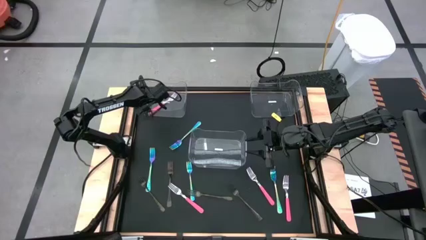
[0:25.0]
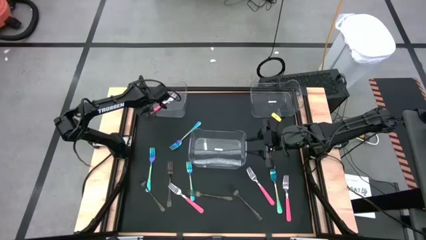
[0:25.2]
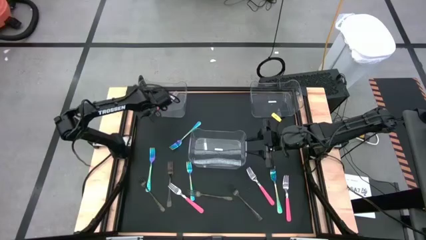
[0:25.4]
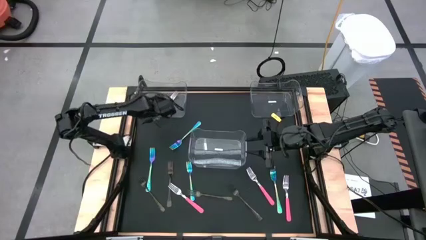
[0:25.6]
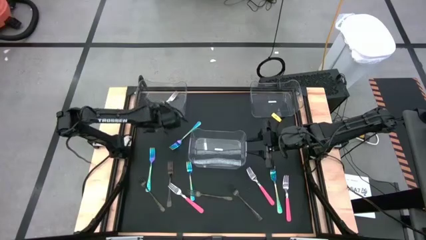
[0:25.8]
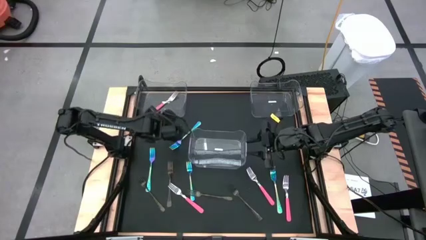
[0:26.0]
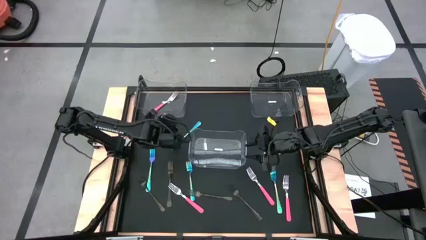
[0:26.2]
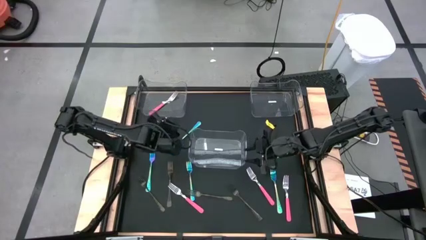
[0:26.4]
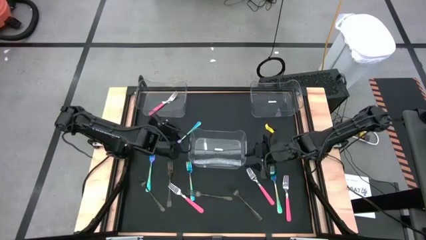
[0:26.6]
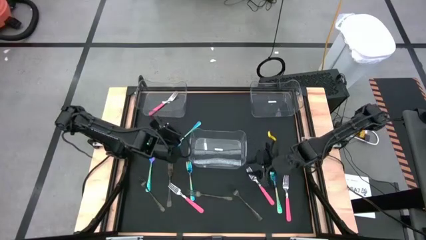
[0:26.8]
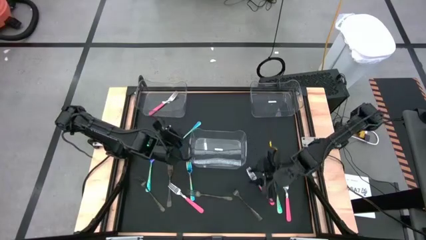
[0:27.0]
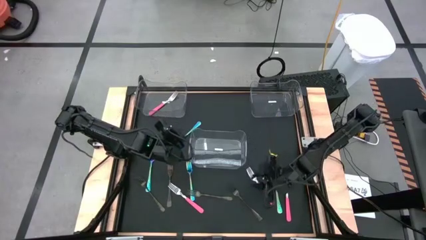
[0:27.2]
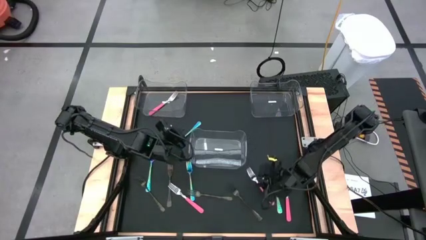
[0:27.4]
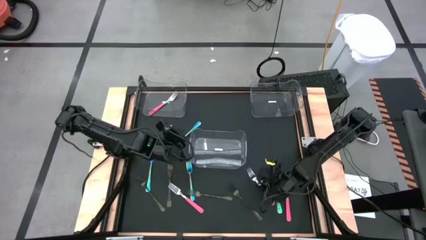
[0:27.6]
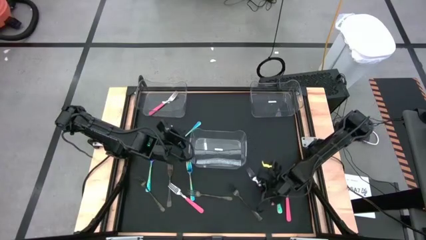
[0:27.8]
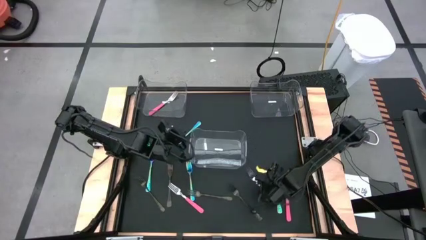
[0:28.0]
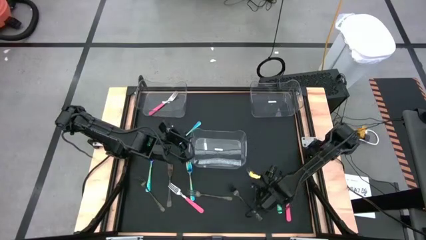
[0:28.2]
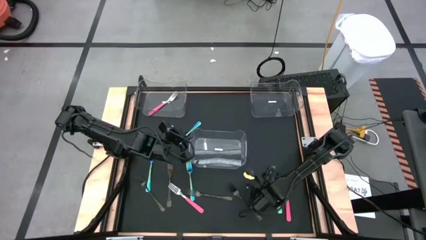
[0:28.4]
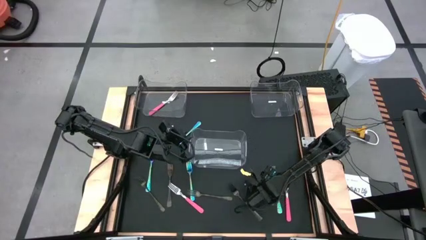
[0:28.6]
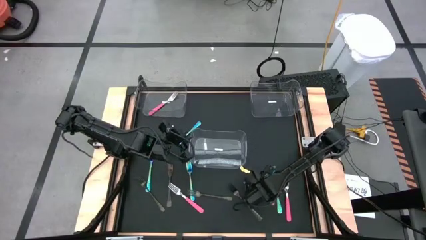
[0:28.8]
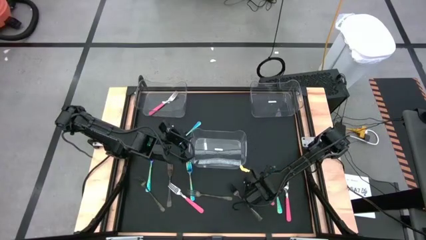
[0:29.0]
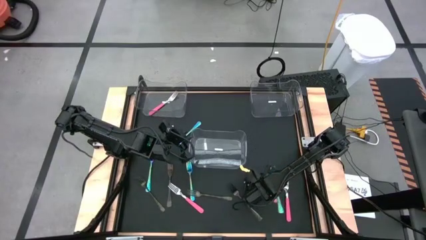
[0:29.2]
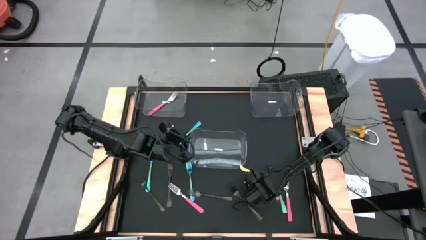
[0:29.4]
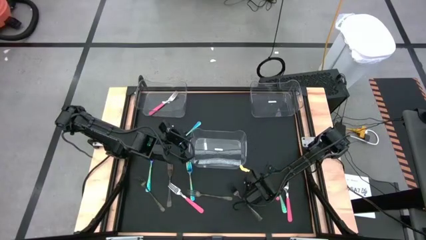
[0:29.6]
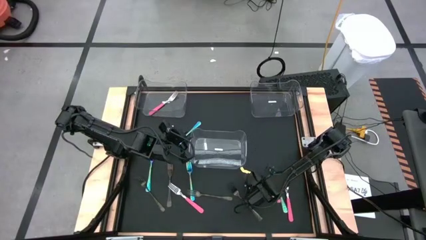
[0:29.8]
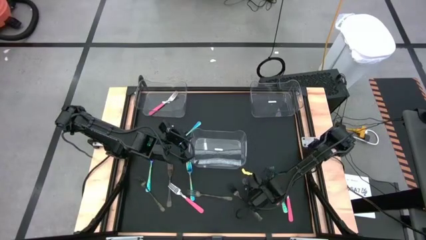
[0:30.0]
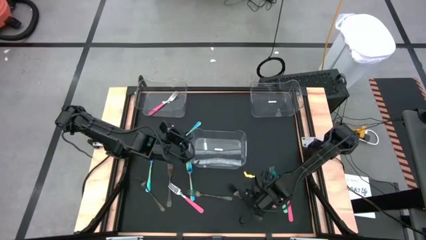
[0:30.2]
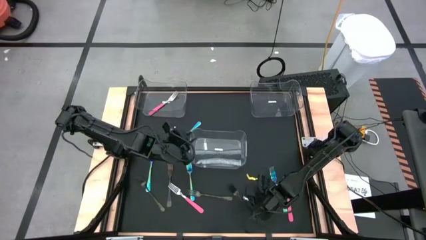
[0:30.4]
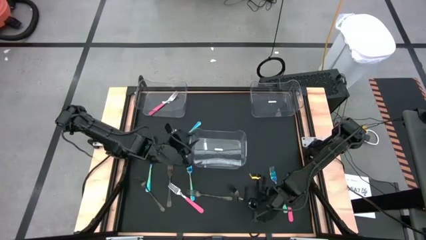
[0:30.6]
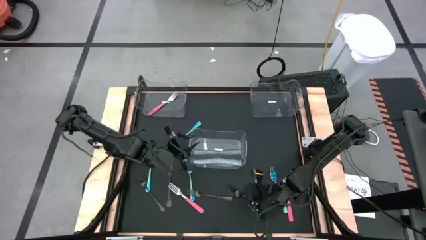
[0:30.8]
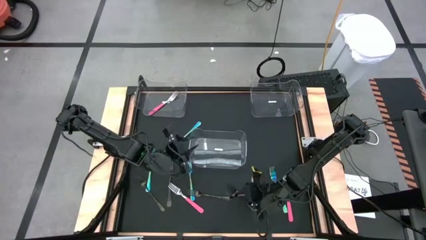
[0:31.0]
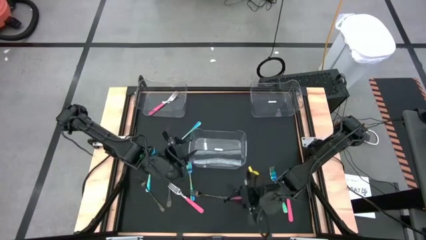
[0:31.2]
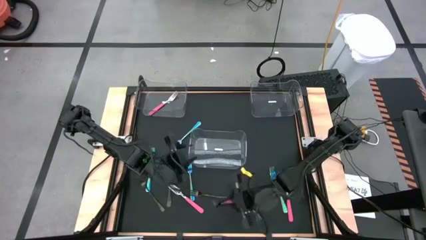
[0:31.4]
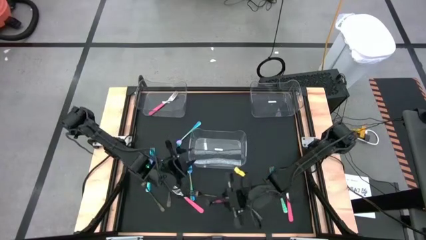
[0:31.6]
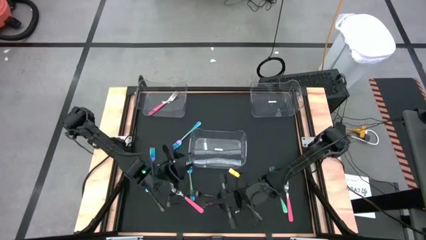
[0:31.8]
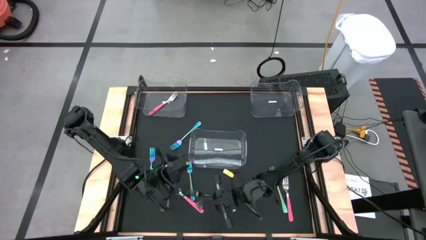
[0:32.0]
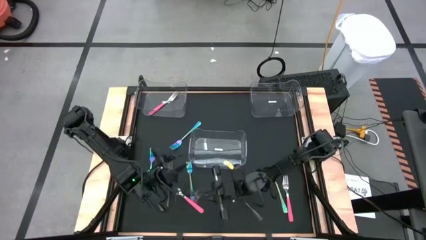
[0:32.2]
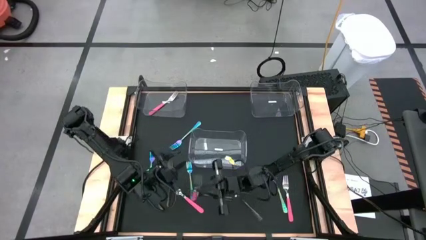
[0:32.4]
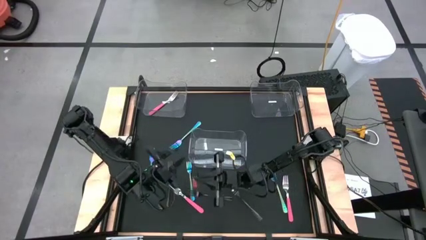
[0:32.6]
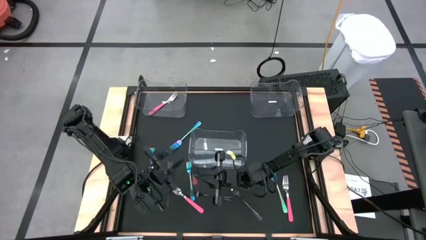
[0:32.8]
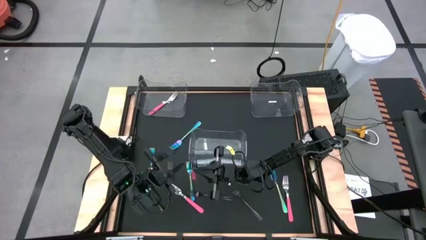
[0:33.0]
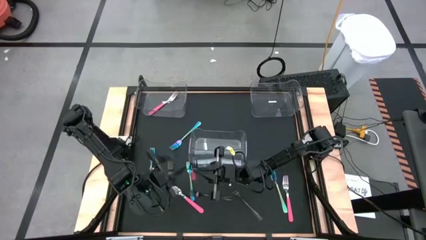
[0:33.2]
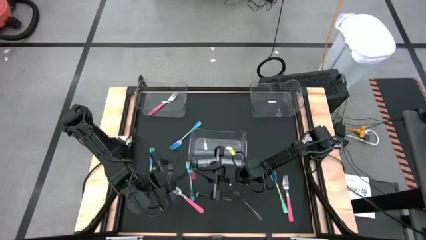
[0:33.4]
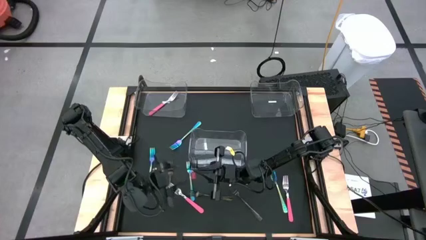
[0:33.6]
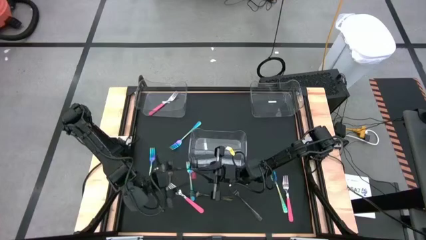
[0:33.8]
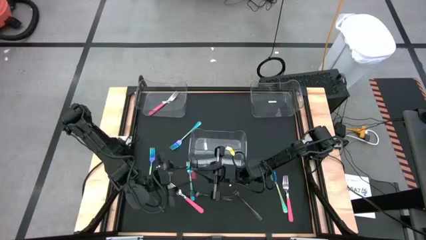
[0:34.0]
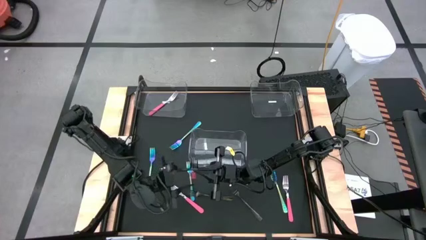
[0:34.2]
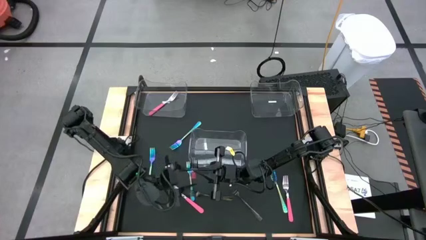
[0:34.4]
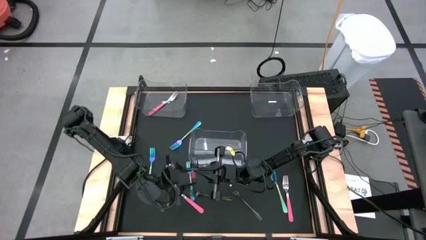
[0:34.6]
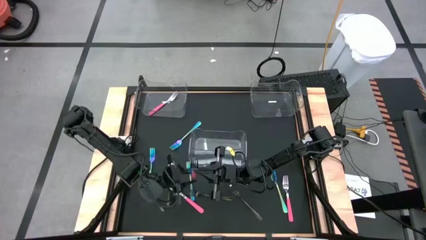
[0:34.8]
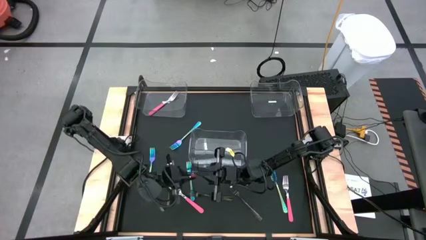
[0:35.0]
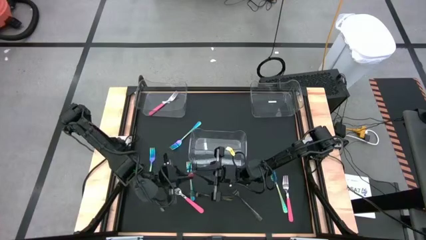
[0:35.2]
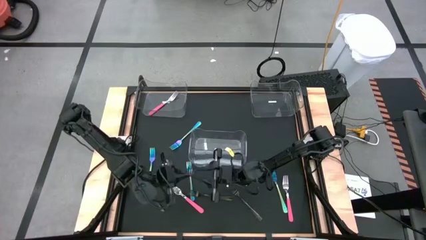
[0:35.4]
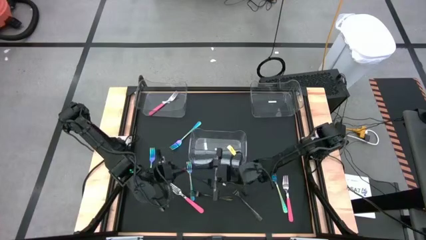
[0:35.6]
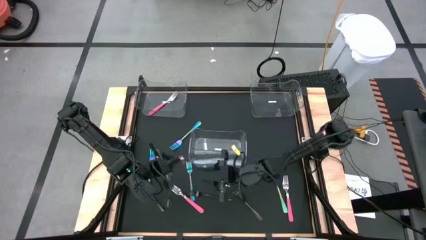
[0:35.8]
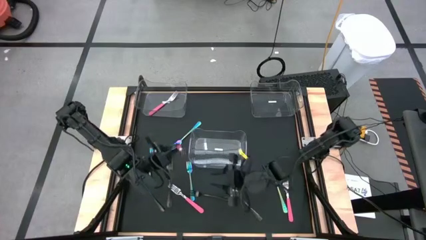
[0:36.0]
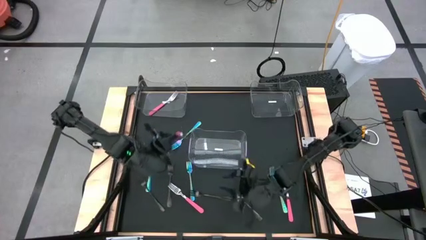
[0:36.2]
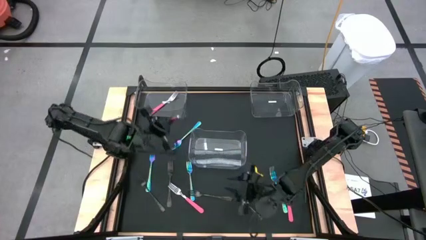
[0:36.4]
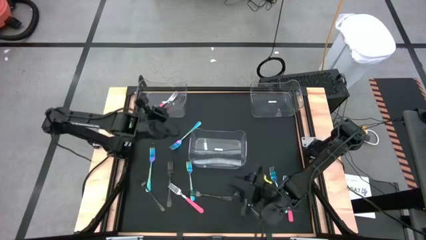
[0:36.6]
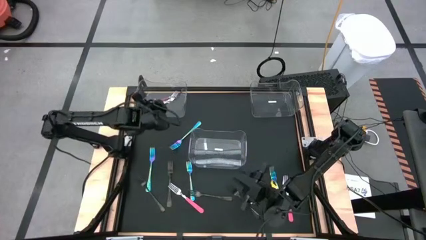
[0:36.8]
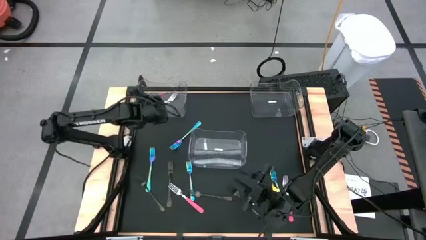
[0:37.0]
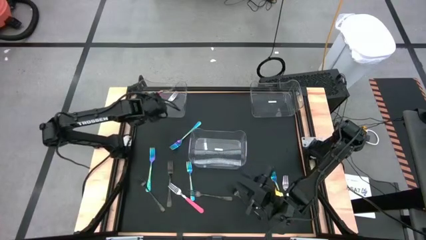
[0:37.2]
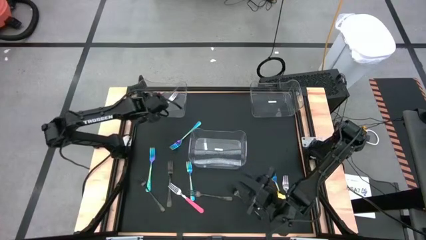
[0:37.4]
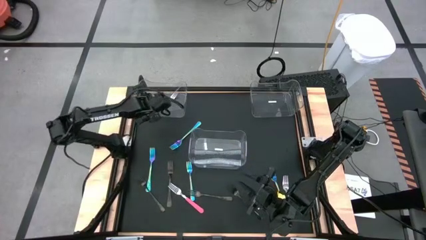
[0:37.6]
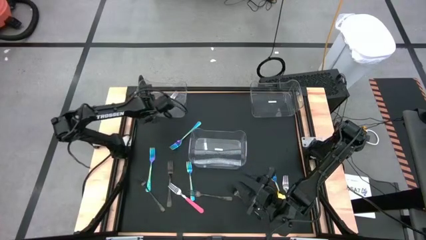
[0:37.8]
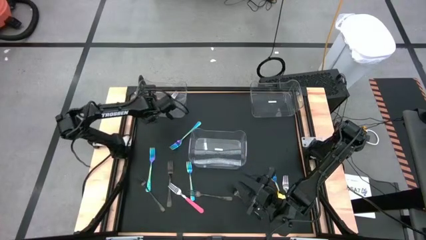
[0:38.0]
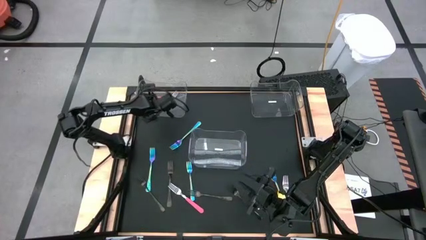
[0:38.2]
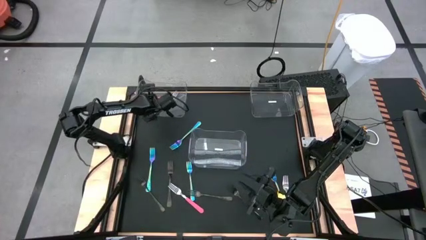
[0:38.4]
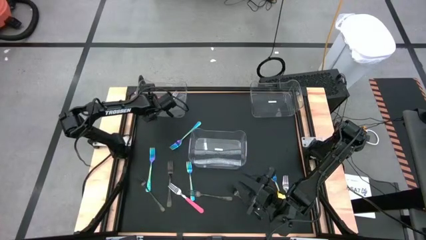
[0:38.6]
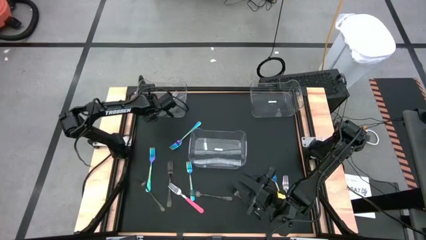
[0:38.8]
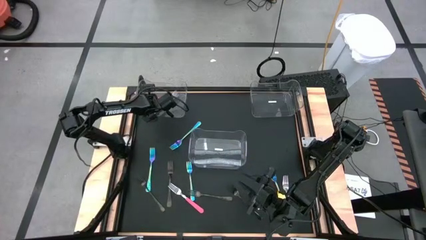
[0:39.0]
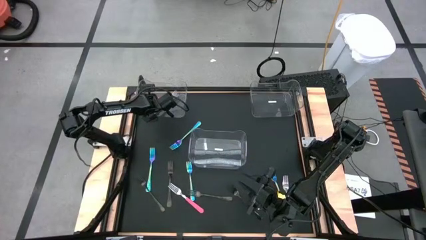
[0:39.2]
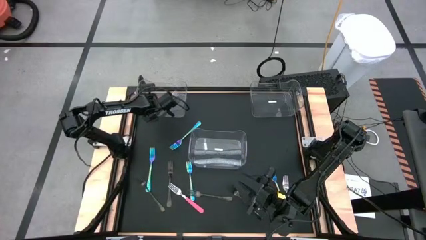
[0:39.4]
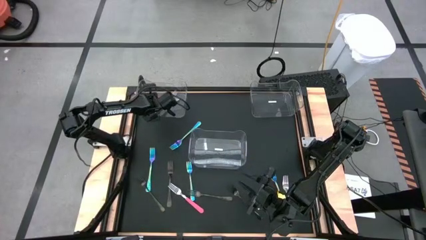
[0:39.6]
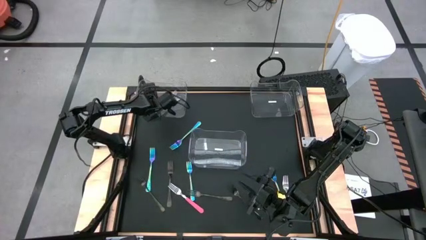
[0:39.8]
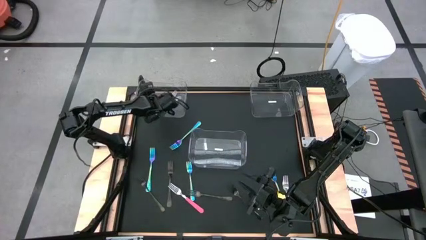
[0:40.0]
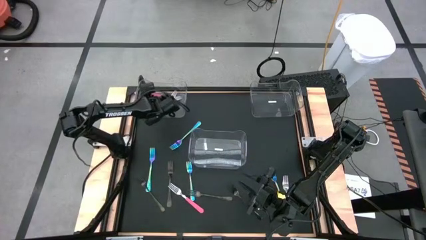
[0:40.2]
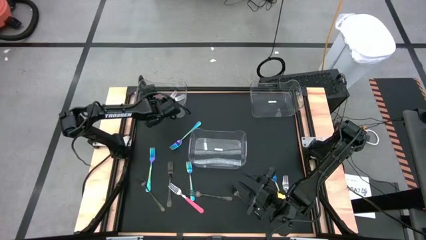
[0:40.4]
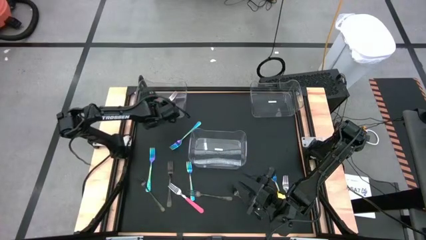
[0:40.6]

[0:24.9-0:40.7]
Task: Sort silverware by color (type)
Put the pink fork into the left transparent bin

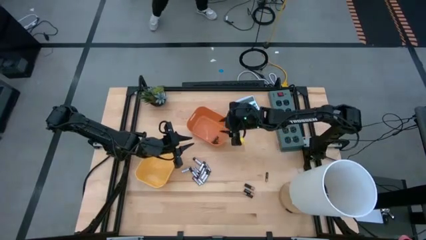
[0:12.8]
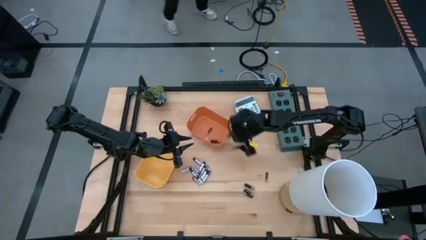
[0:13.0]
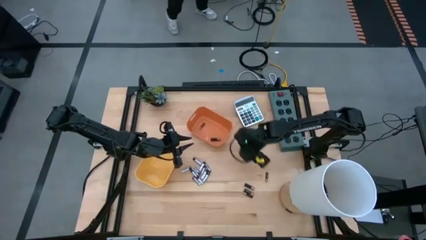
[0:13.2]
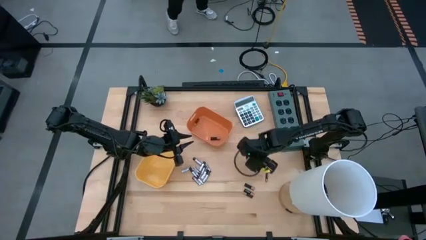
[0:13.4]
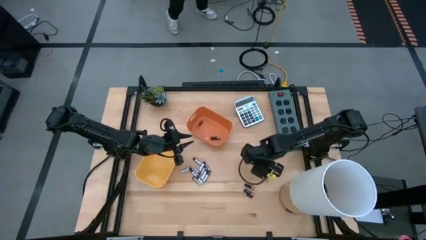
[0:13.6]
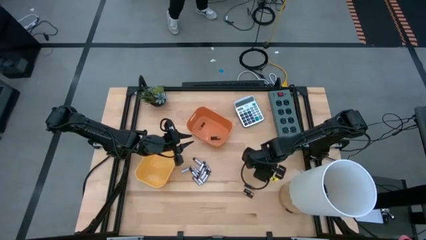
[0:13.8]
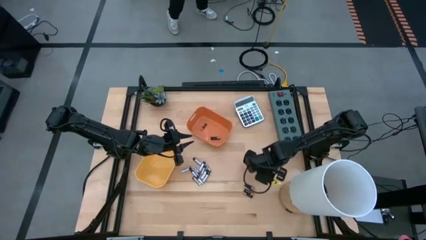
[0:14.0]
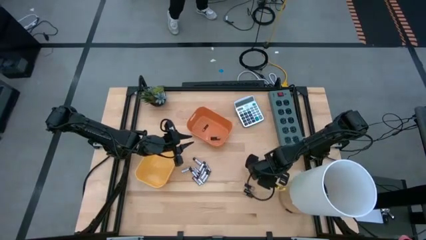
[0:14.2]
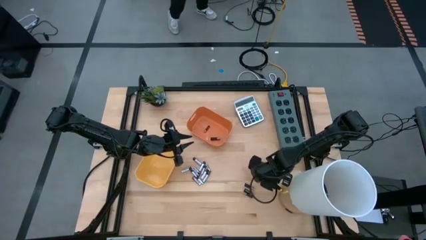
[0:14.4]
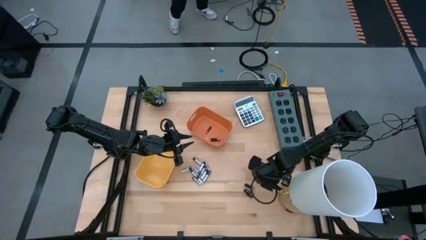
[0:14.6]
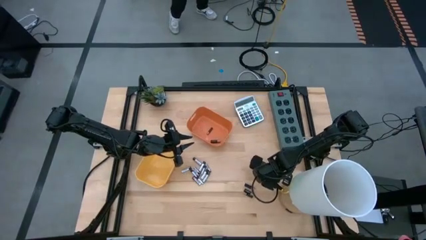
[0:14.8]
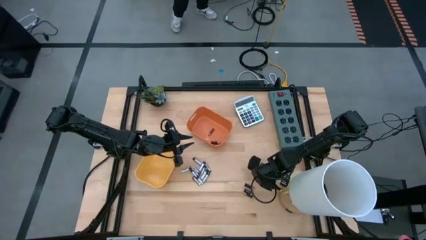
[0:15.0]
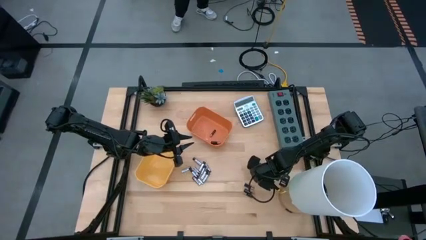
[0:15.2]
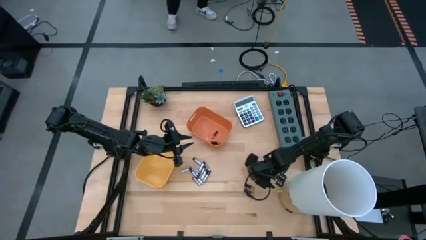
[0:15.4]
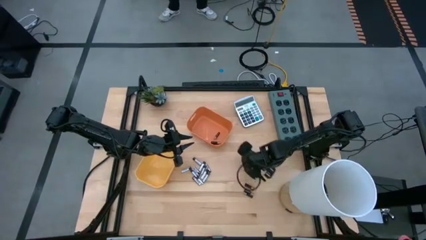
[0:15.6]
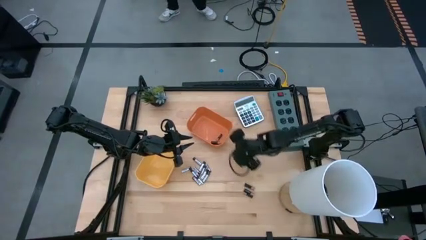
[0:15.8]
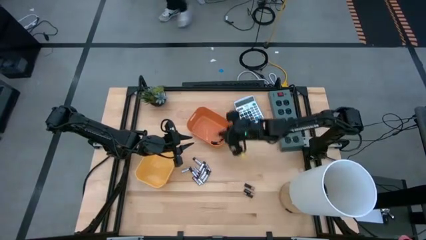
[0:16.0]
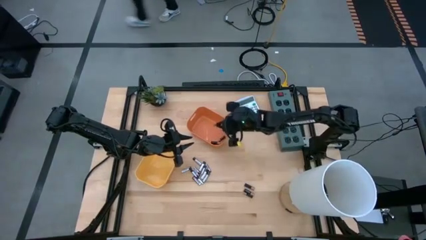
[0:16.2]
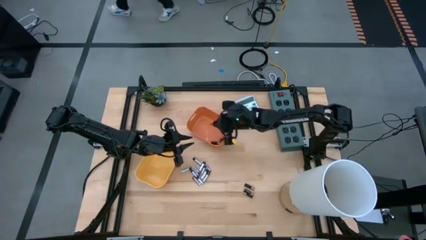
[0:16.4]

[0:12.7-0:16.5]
Task: Sort batteries
Put the black battery into the orange bin
